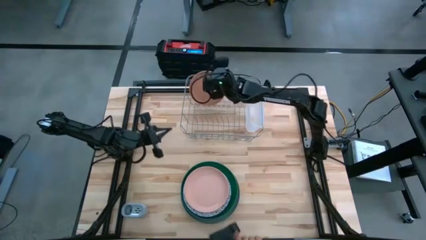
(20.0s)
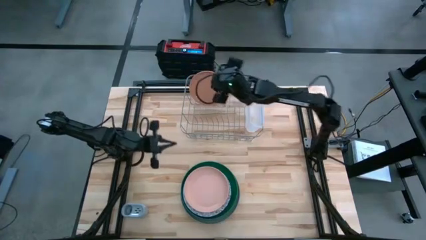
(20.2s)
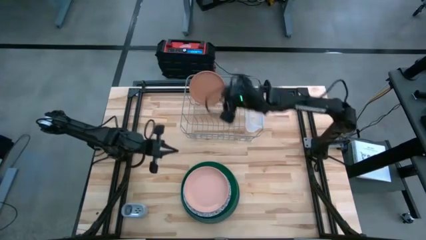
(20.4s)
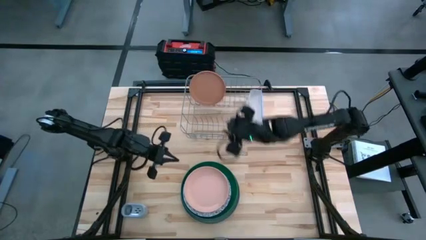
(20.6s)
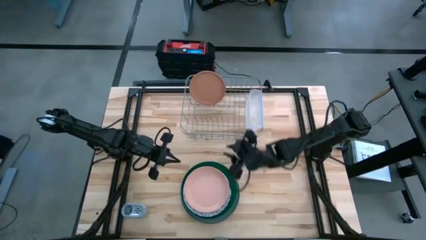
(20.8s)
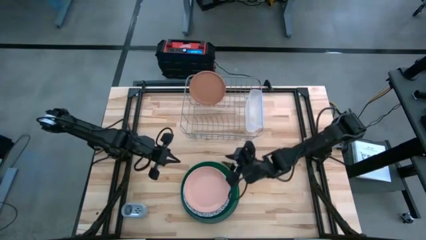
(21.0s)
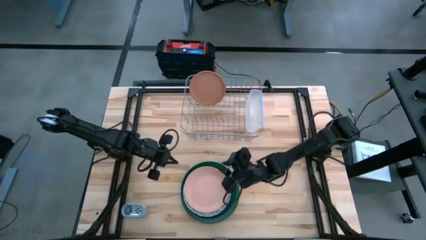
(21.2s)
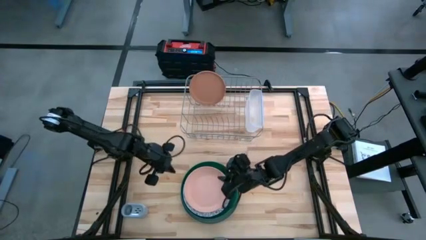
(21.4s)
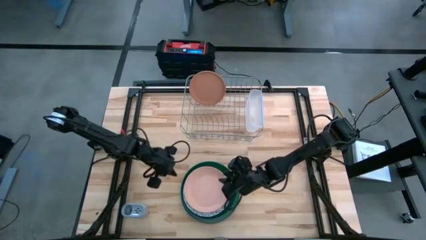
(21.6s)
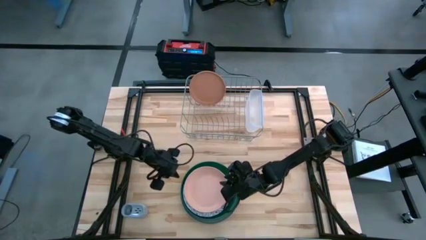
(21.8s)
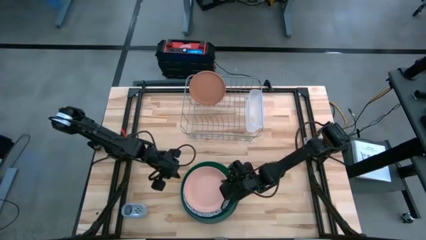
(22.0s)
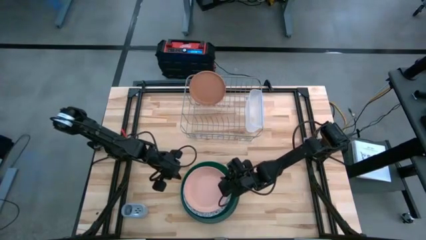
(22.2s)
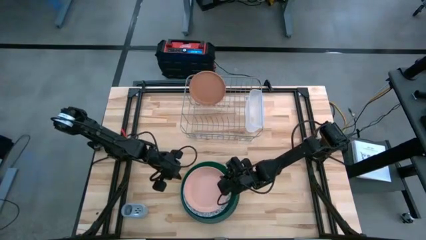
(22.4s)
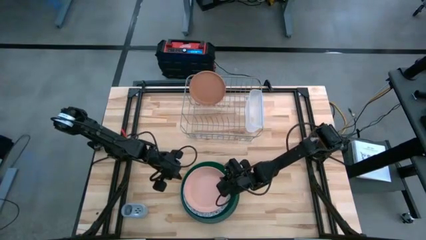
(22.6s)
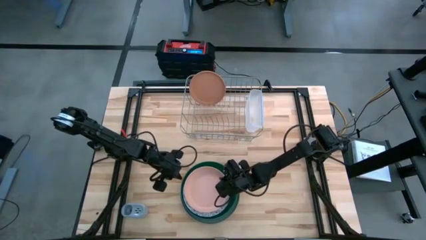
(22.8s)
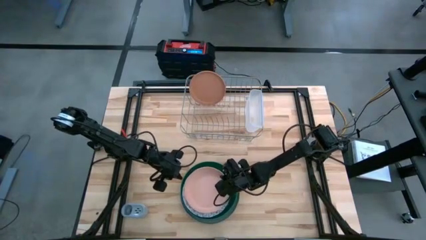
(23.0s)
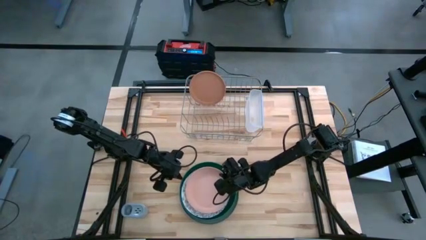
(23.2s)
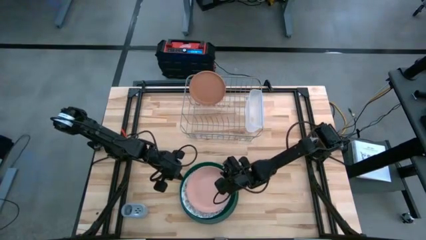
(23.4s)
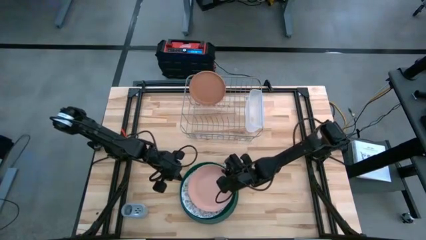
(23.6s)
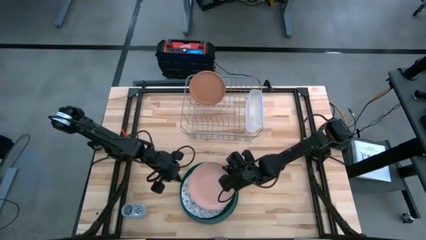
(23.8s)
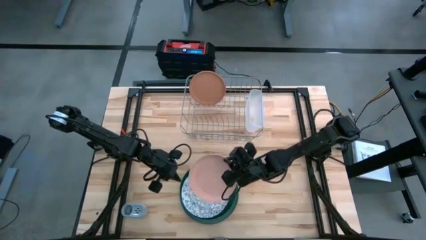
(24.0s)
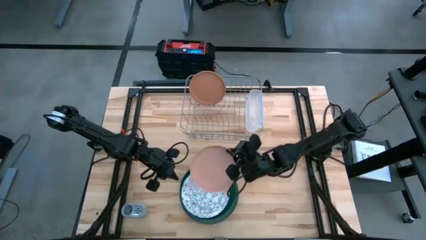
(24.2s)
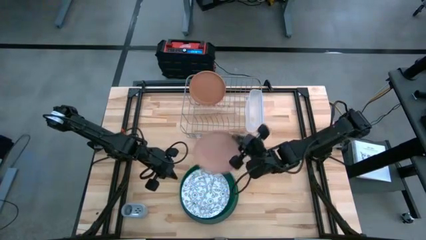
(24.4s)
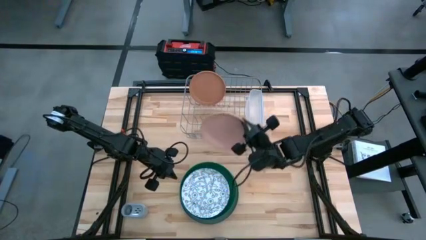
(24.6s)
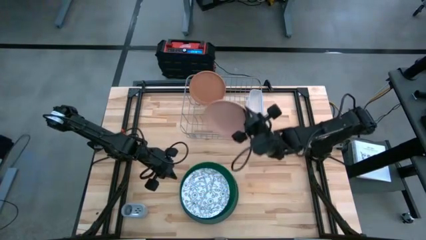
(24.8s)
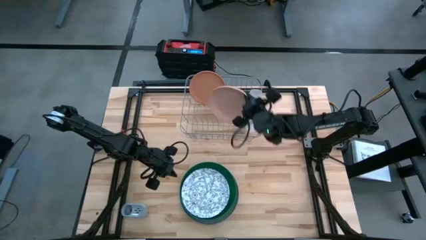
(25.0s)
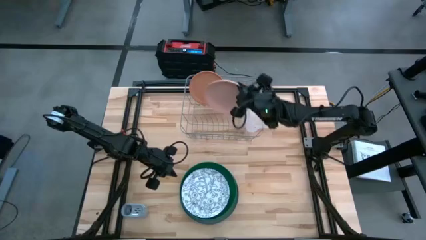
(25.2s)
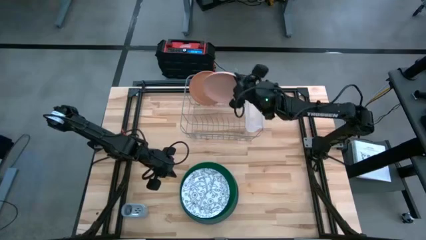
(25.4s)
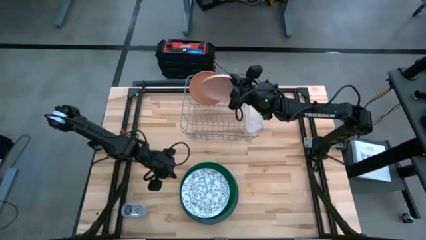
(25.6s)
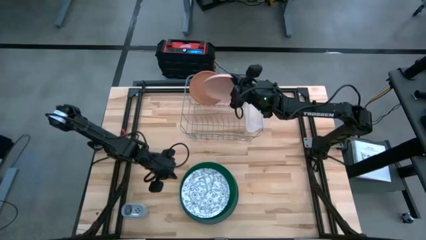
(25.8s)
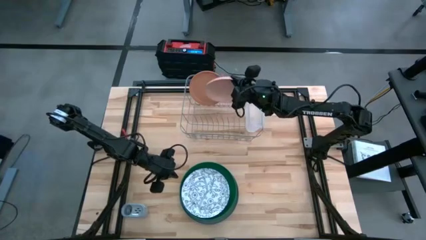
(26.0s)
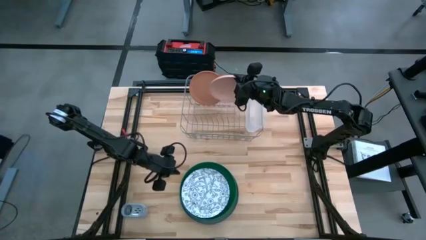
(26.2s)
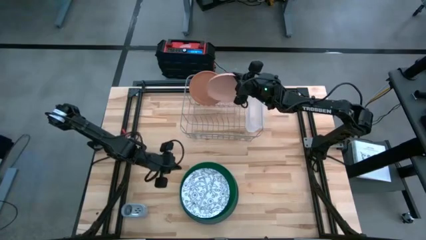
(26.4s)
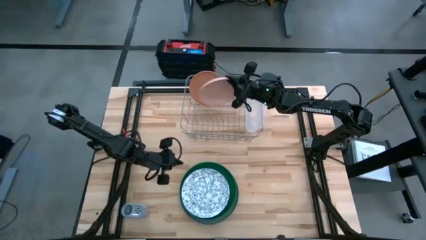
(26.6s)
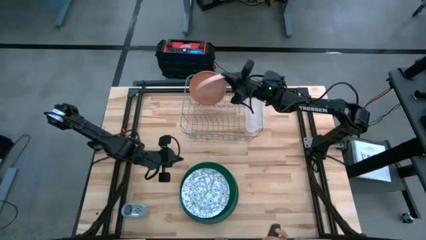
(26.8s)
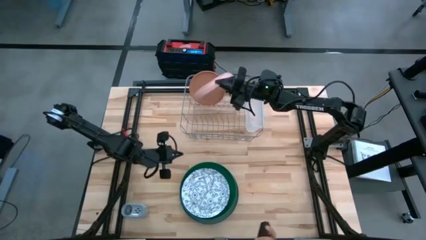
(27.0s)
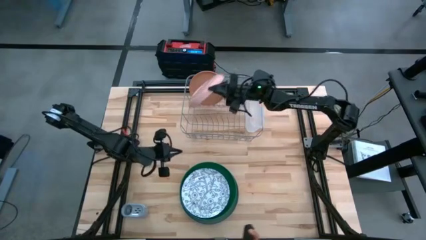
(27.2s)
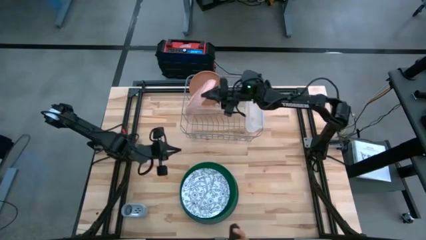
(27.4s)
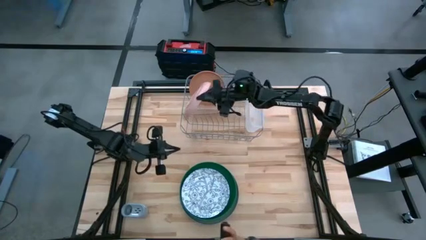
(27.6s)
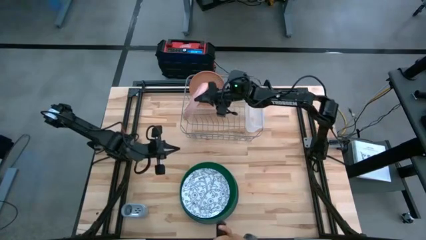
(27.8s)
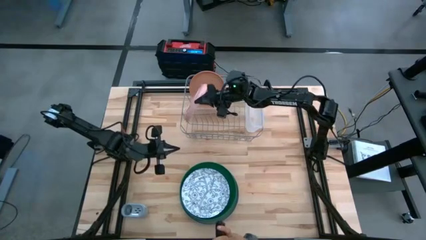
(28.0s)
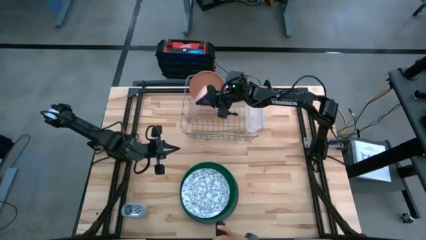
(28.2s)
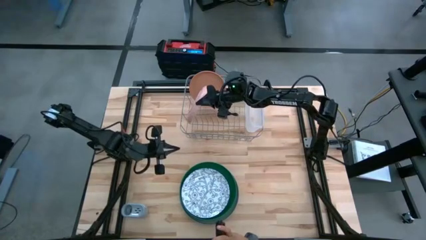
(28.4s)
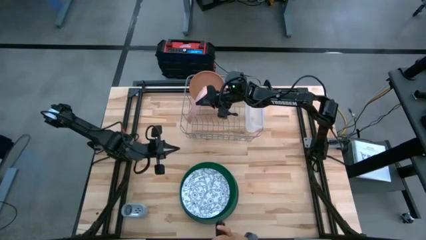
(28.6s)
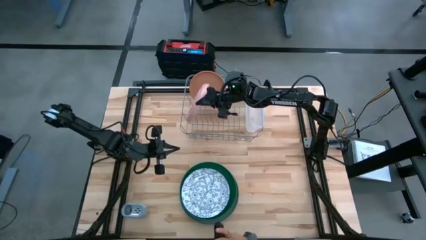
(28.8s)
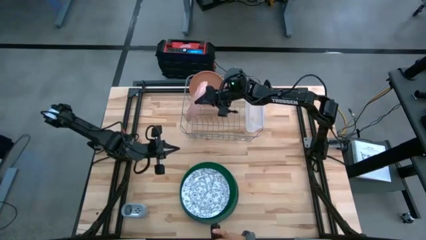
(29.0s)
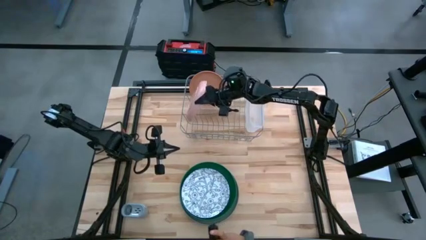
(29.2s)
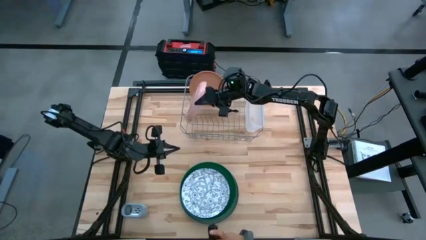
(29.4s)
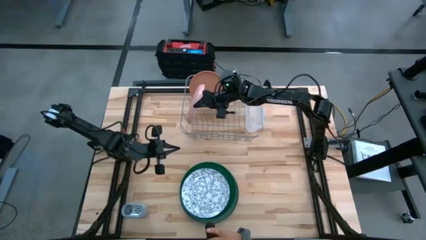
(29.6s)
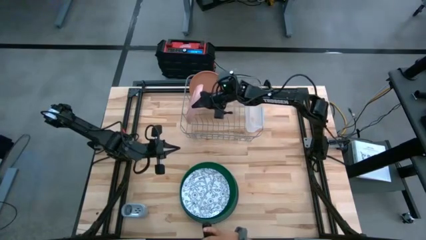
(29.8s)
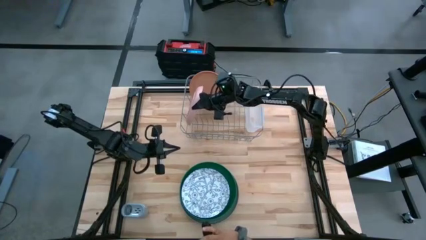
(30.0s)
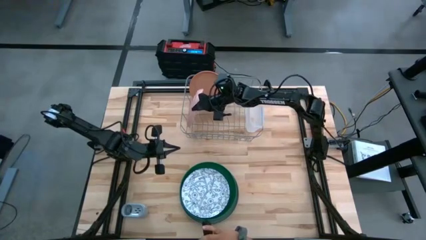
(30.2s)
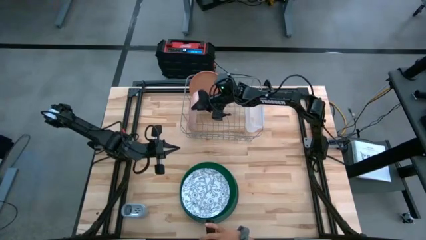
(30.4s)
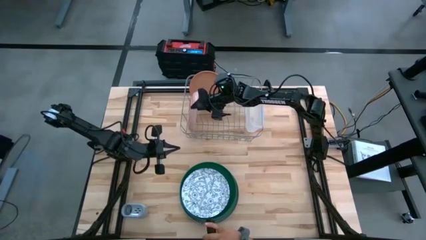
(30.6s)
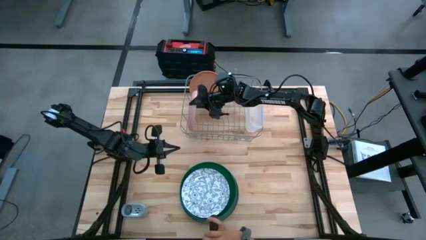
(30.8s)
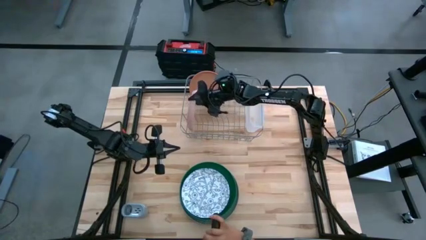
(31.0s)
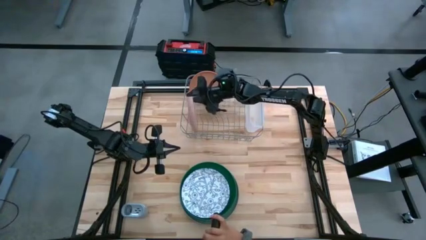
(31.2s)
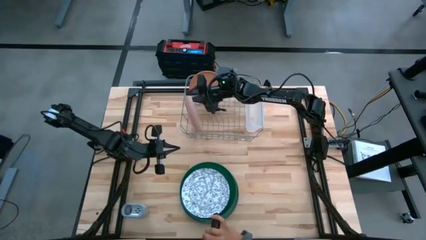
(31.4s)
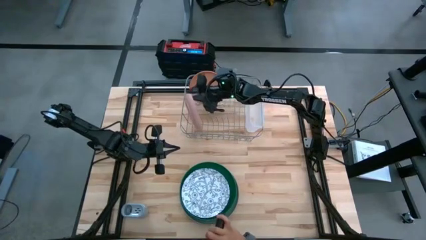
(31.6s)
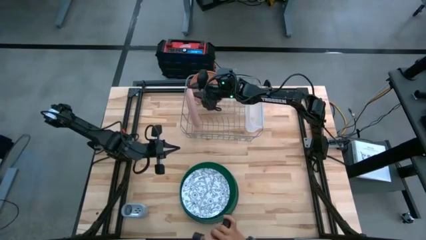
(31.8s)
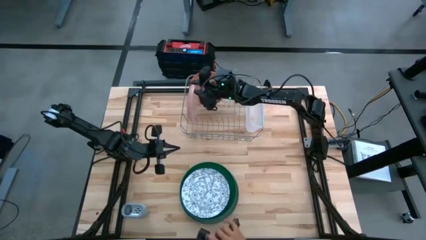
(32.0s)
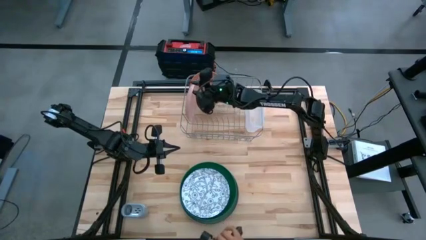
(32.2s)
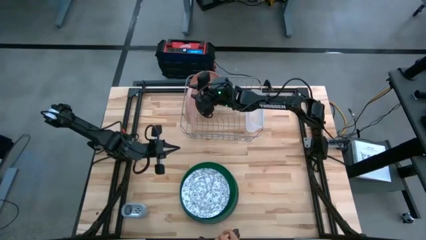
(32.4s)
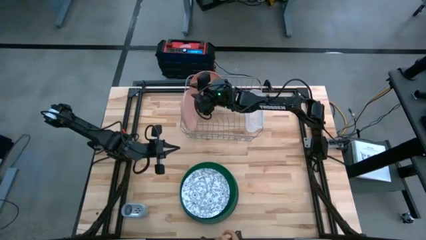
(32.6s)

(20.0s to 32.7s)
Task: Sort dishes
Put the light pink plate in the dish rack

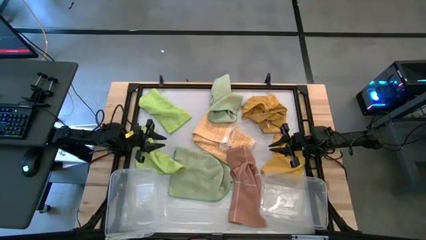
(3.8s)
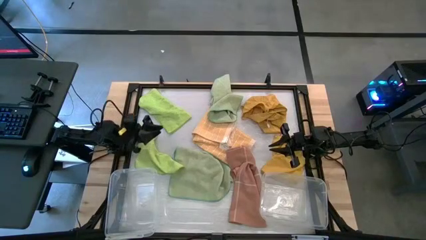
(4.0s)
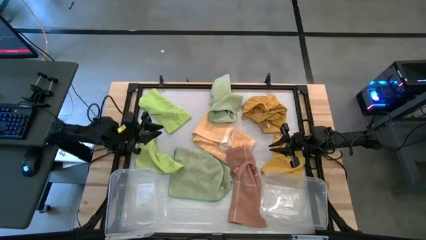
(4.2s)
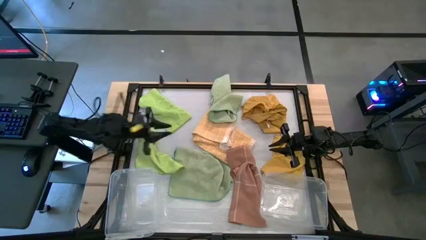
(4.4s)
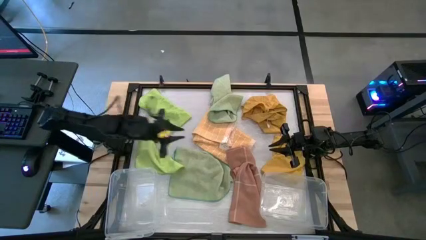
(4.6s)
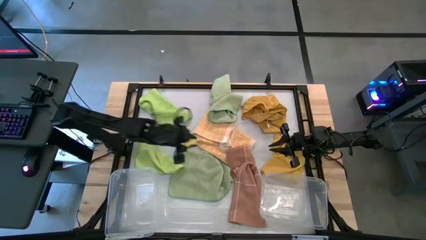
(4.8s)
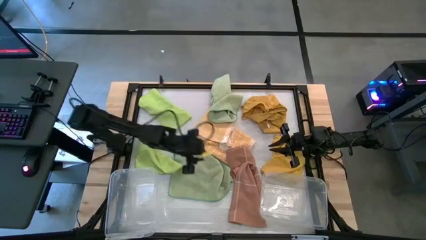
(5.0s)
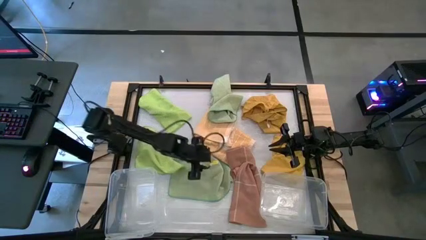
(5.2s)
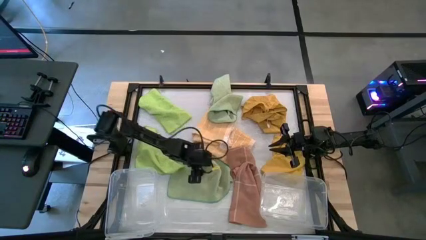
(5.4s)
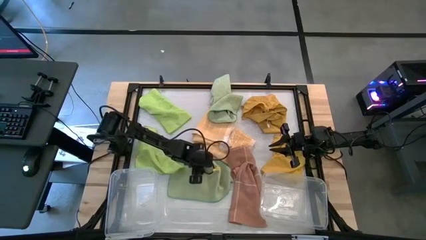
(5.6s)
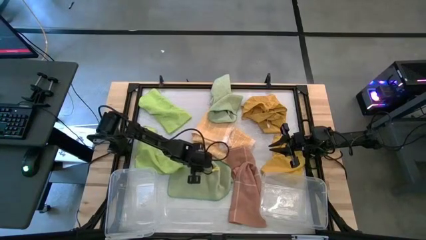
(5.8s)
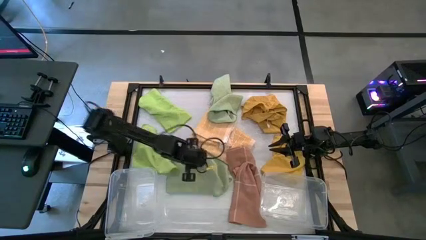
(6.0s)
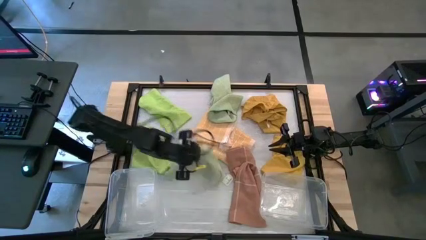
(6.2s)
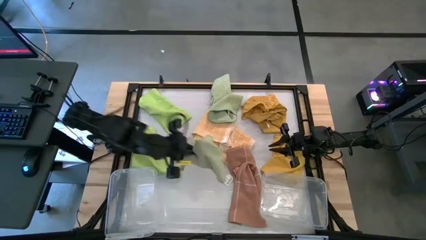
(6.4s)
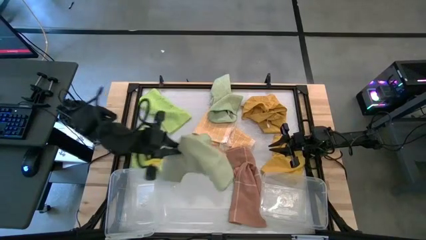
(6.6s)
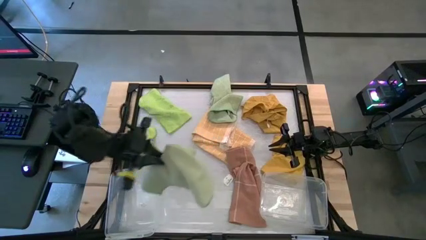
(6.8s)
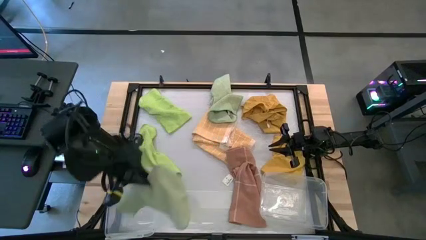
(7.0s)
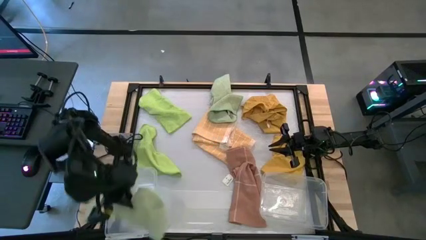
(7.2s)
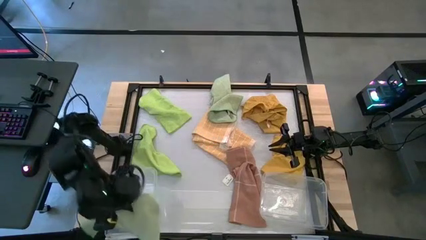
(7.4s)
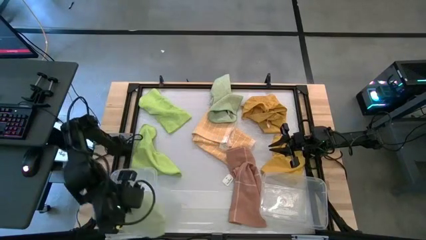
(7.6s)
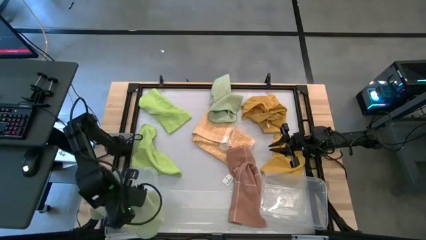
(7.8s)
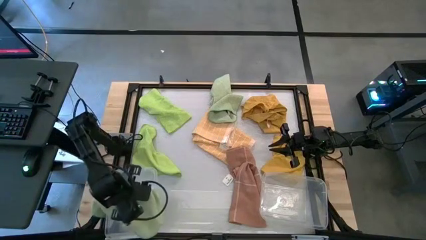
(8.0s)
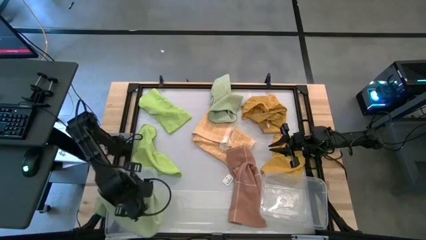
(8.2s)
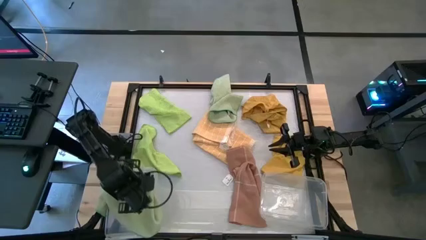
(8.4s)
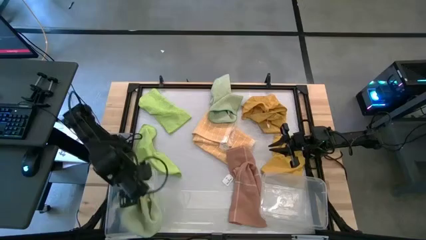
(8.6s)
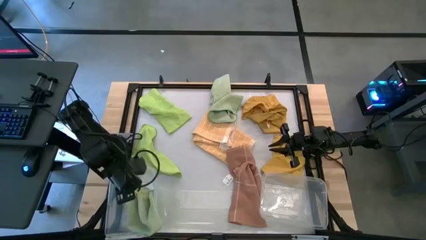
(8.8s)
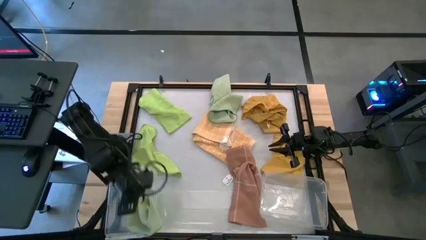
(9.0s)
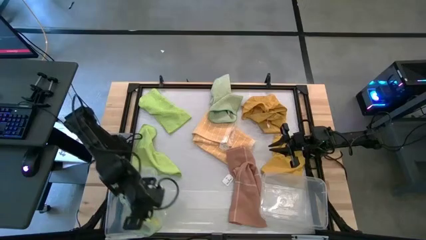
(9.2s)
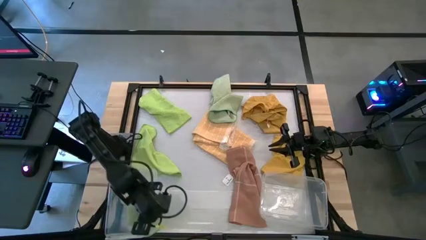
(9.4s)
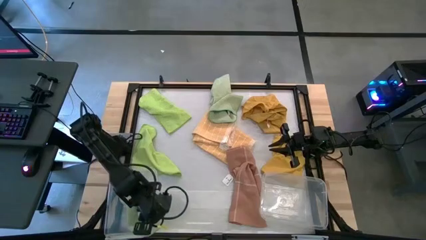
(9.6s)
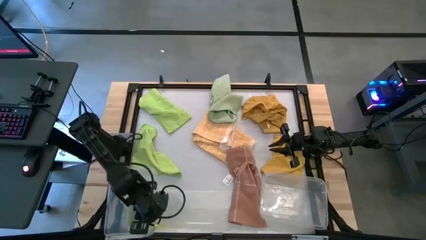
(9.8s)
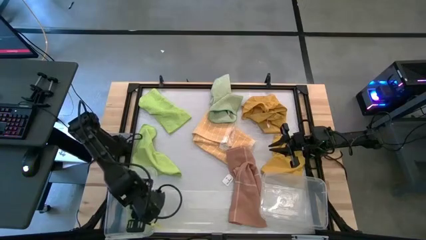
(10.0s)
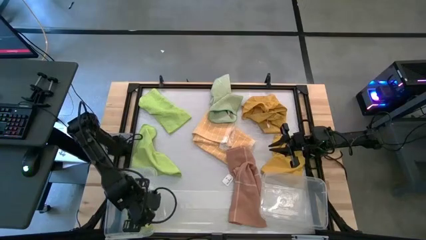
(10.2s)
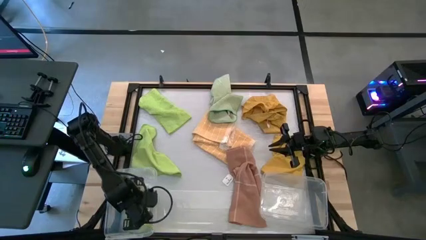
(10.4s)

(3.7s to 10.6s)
Task: Sort microfiber towel by color & place in baskets
Put the bottom dark green microfiber towel into the left transparent bin
